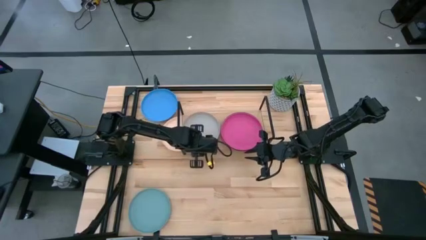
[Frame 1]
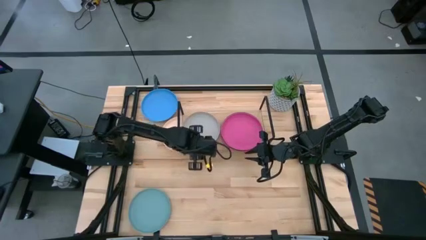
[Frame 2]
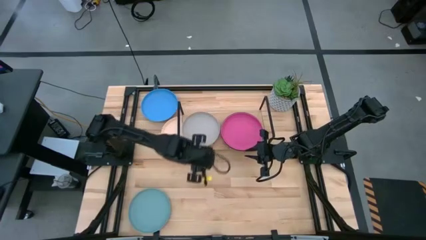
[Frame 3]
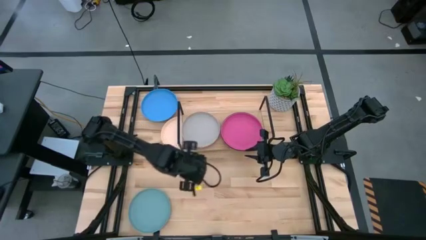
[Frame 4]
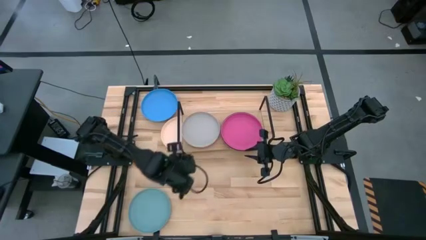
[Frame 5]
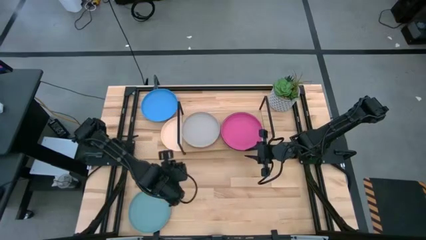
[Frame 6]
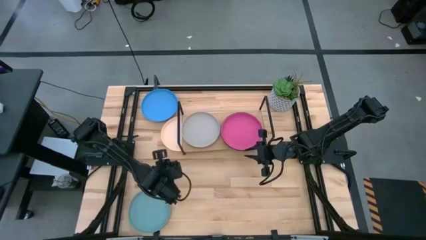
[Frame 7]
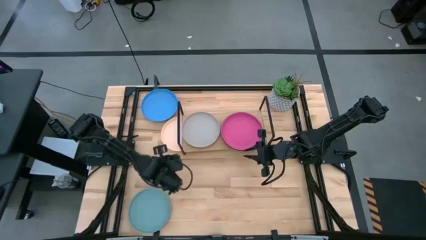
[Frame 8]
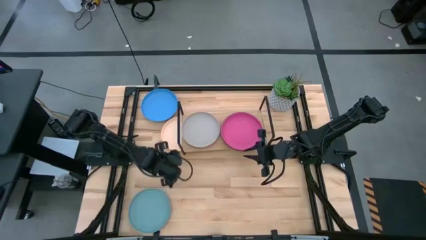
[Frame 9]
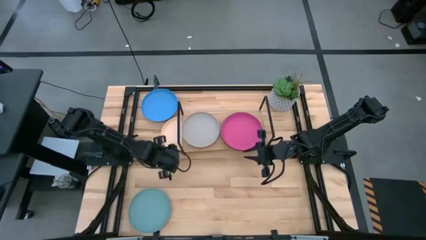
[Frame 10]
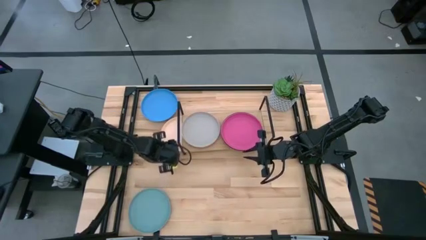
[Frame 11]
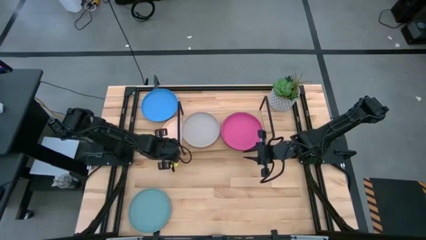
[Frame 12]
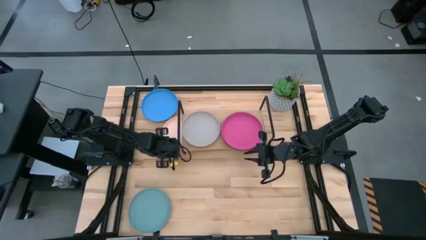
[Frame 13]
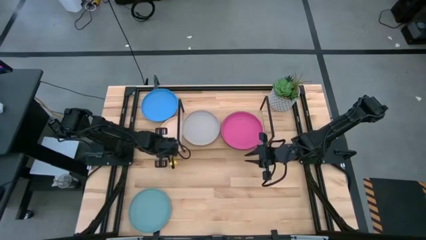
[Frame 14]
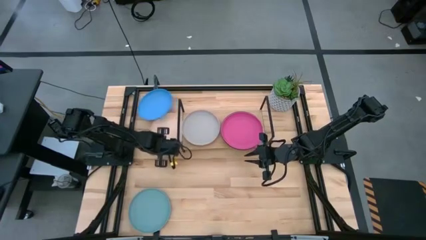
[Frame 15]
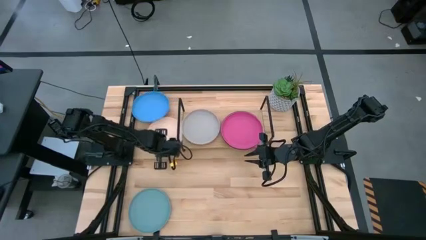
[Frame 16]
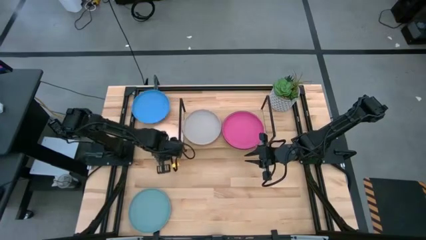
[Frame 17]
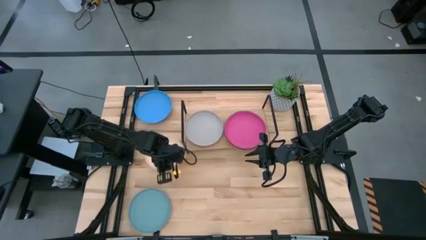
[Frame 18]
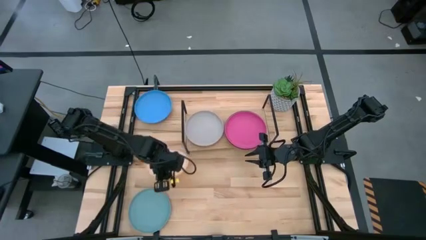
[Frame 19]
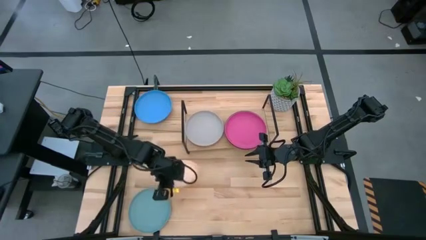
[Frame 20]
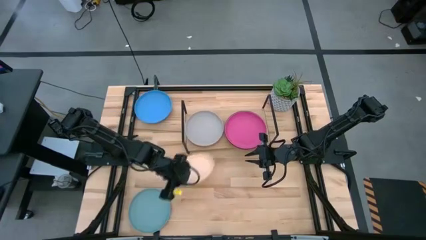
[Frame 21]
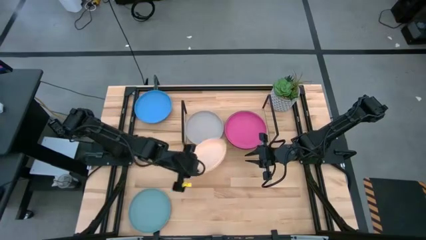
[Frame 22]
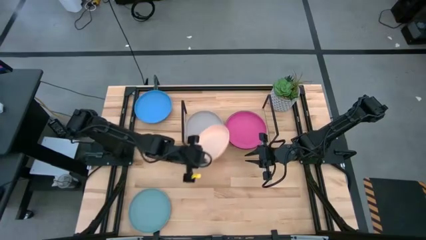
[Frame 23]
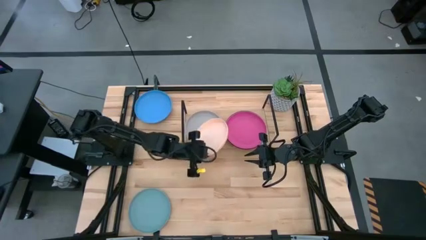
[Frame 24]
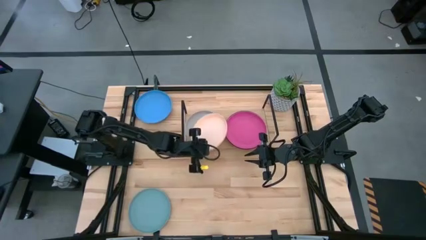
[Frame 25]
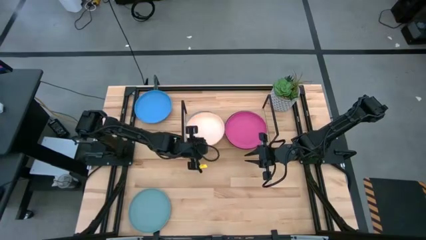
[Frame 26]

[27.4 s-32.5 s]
Task: Place and stack plates onto a shelf
Stack the white plate on top of the gray plate on the shelf

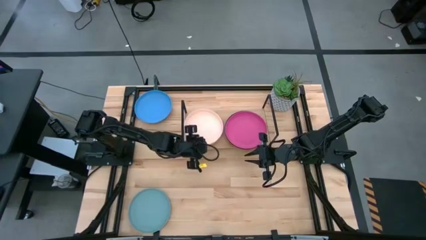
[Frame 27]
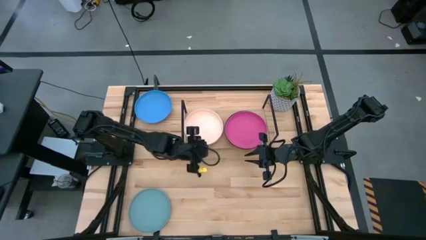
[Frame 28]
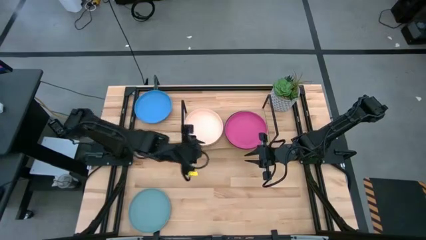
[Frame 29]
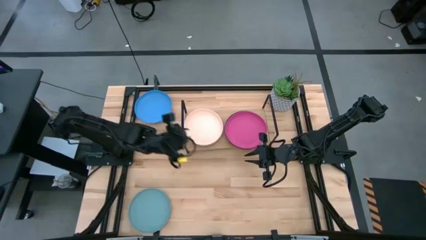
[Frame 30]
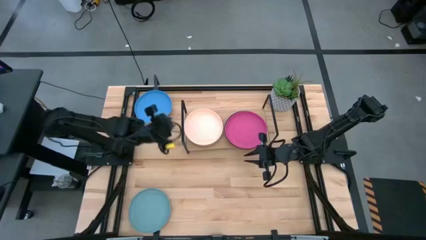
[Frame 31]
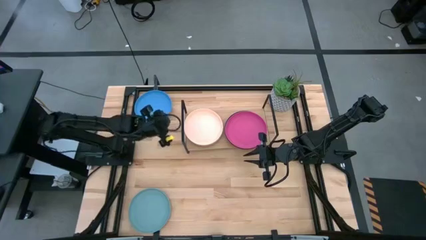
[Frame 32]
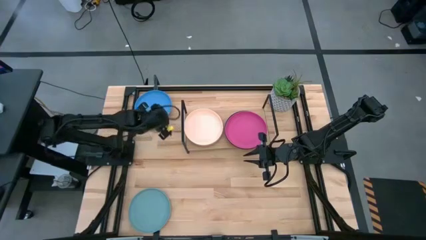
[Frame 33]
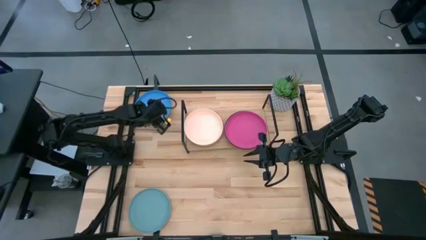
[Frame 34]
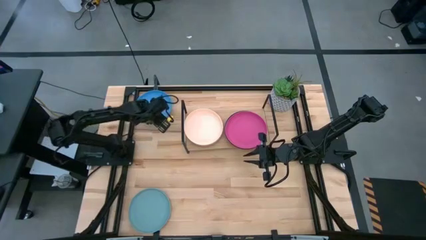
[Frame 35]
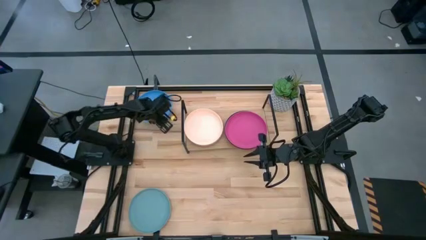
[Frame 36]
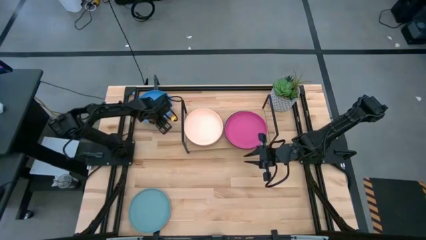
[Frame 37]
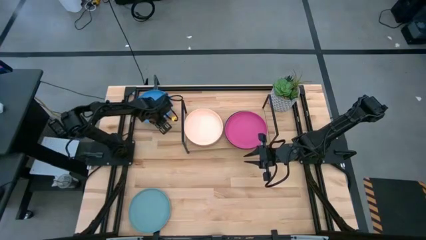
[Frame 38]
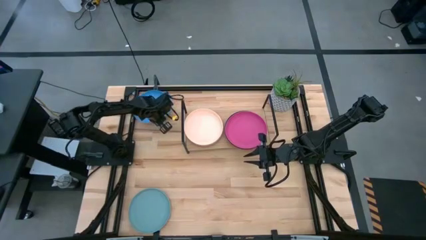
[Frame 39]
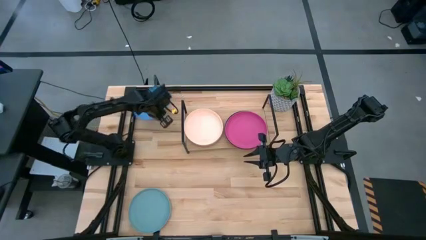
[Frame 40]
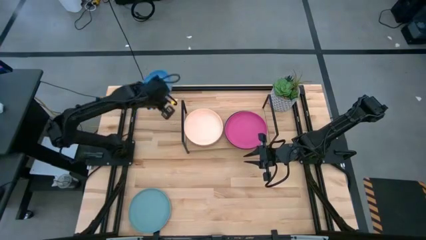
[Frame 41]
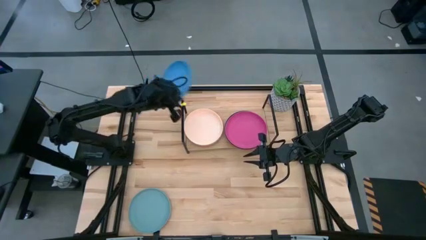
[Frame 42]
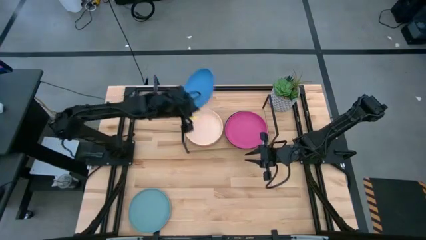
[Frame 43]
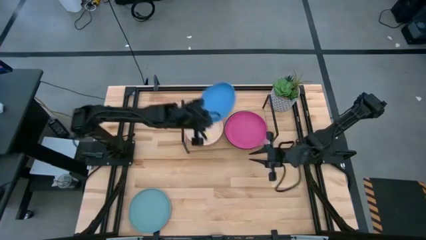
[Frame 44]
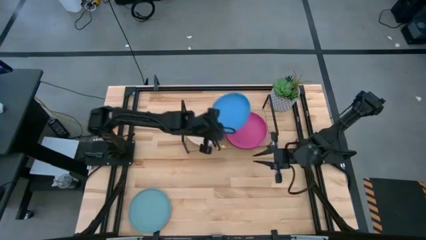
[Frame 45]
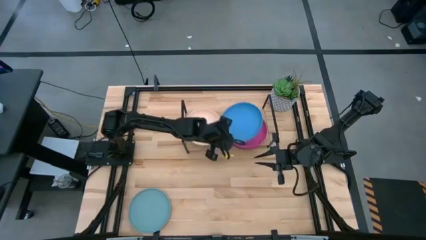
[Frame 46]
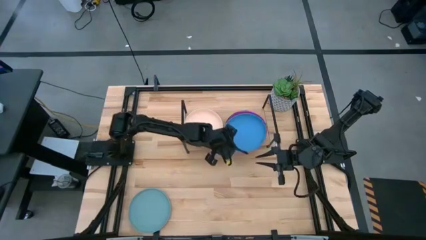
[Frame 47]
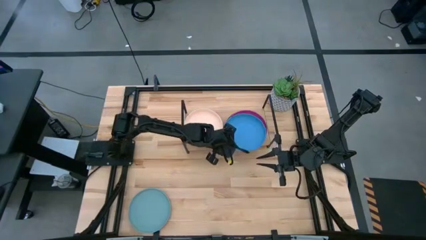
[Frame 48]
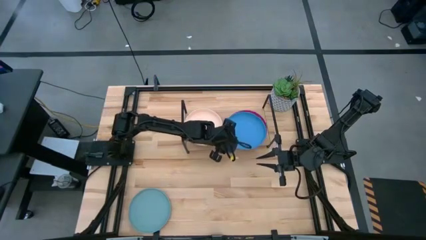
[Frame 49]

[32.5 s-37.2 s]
Stack the blue plate on top of the pink plate on the shelf

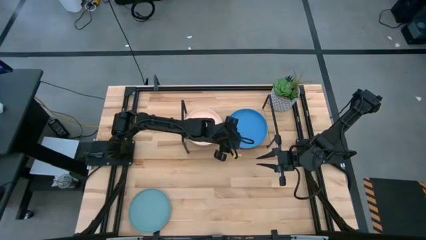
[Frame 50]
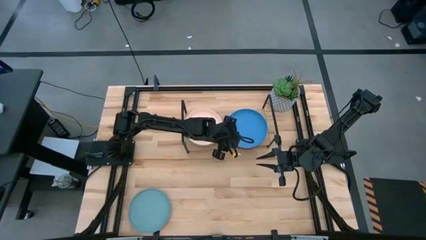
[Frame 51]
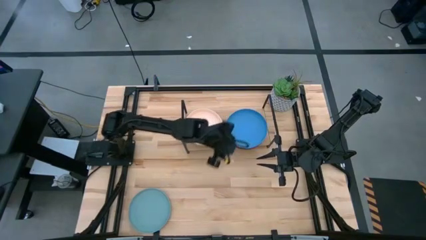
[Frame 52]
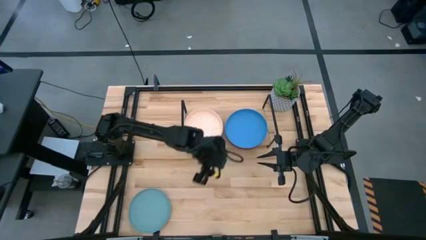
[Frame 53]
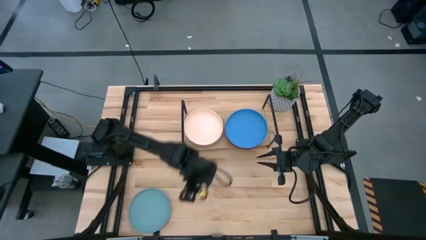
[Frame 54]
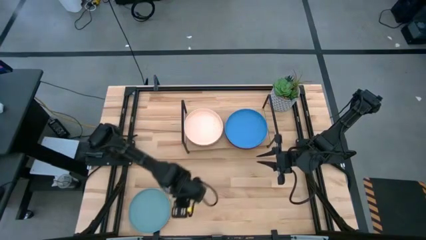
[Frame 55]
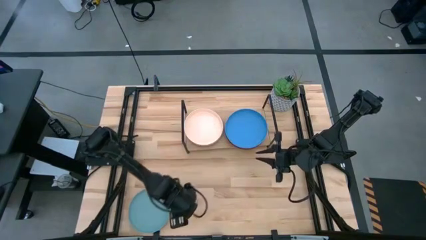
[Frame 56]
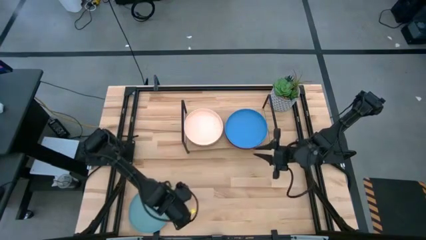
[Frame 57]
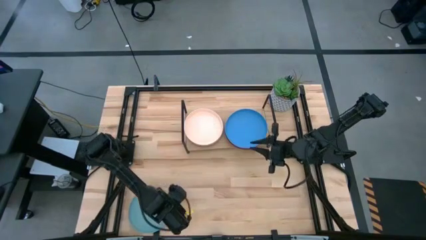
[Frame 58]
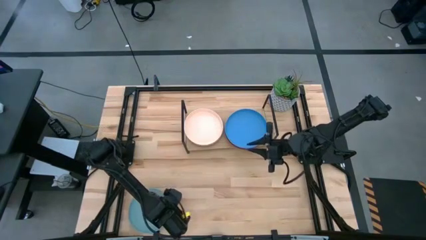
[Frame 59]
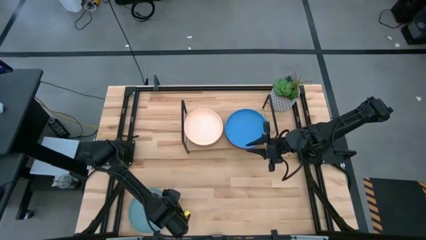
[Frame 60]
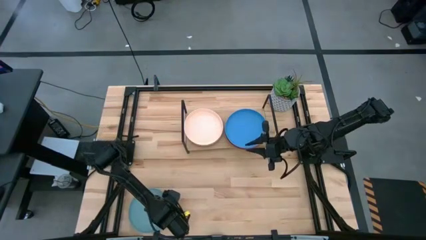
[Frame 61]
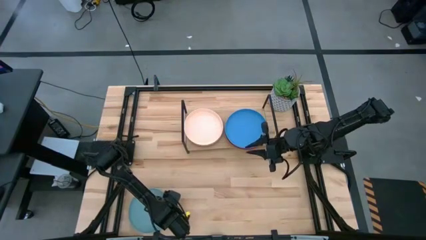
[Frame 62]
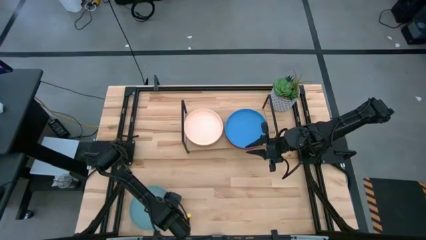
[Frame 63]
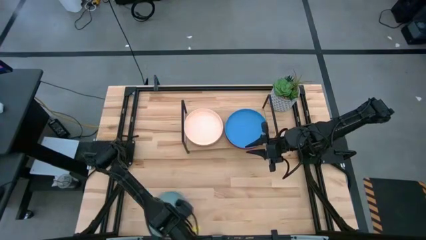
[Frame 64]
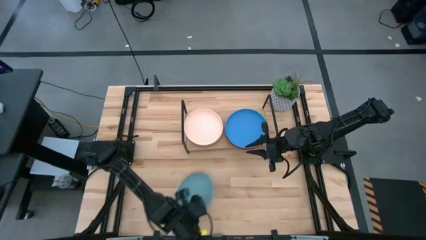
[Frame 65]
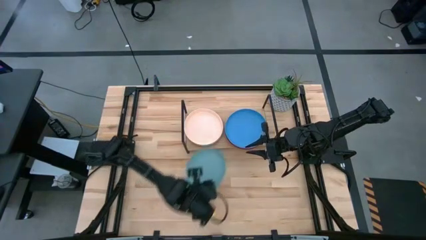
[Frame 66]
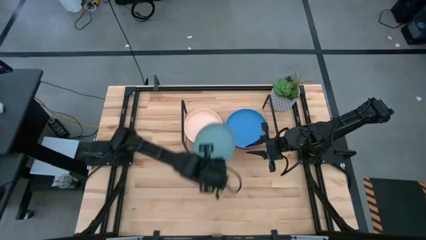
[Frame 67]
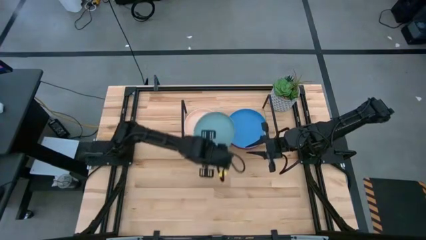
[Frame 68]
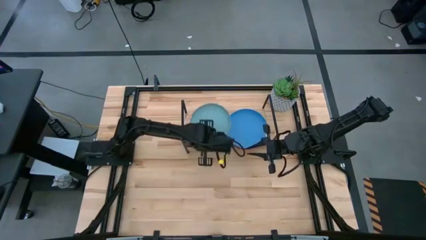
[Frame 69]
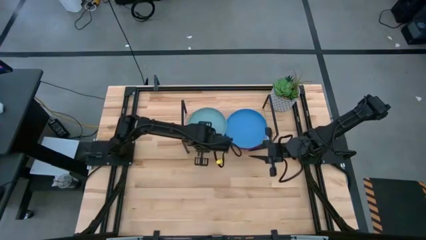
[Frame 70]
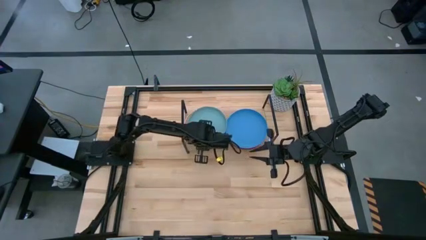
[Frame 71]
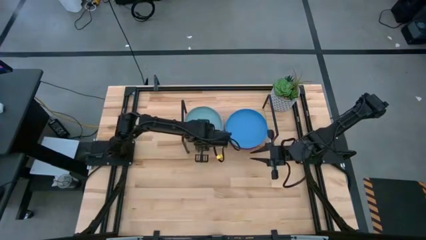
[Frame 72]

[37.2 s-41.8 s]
Stack the light blue plate on top of the white plate on the shelf

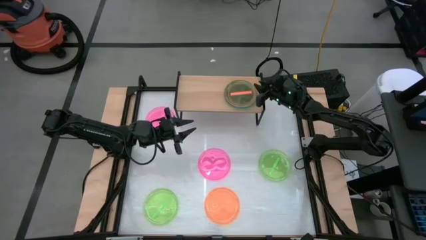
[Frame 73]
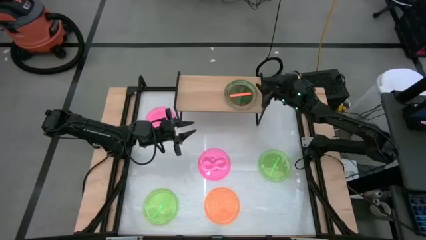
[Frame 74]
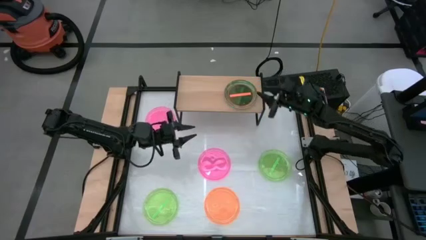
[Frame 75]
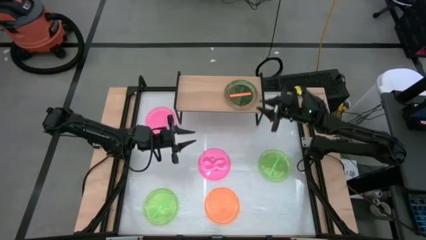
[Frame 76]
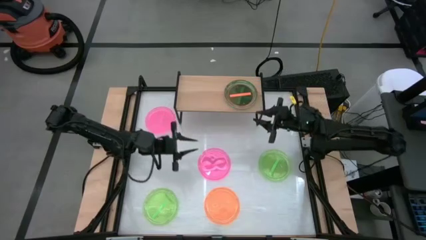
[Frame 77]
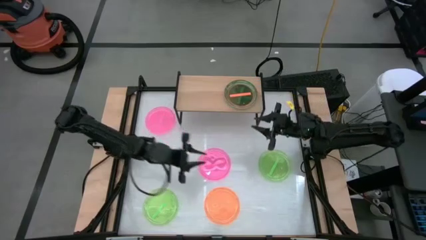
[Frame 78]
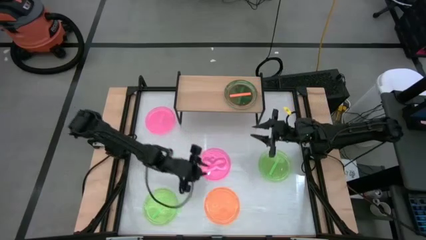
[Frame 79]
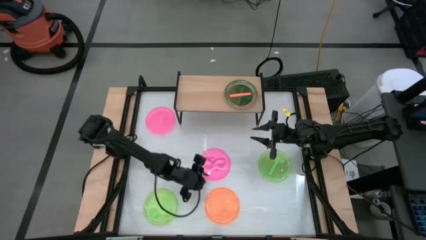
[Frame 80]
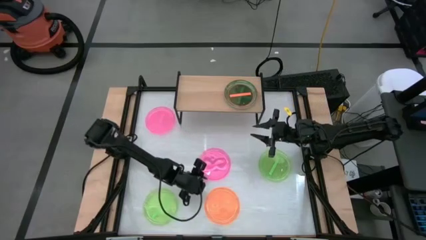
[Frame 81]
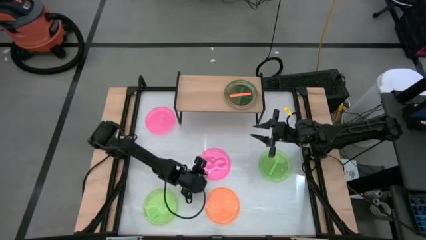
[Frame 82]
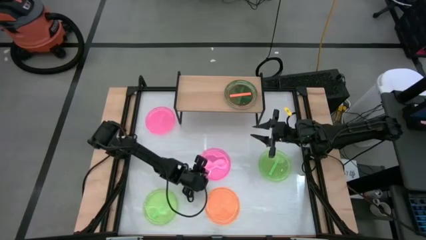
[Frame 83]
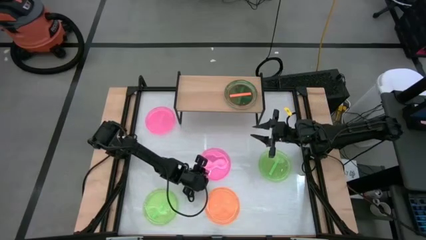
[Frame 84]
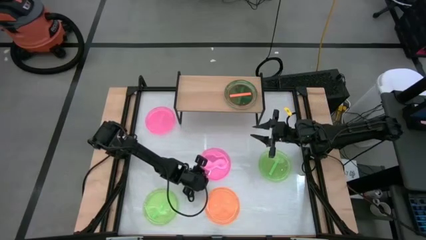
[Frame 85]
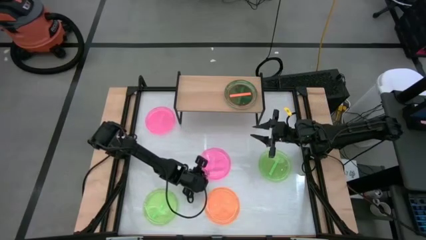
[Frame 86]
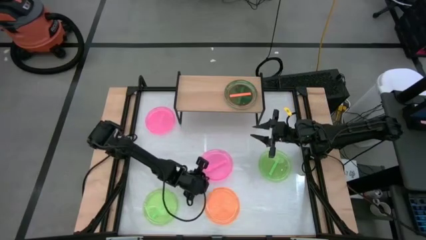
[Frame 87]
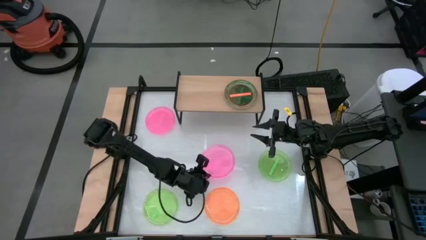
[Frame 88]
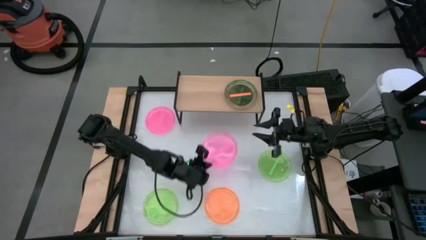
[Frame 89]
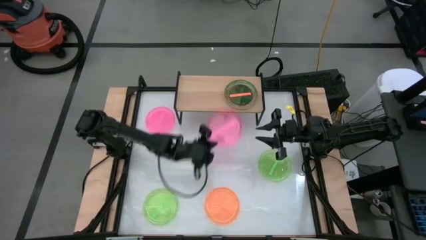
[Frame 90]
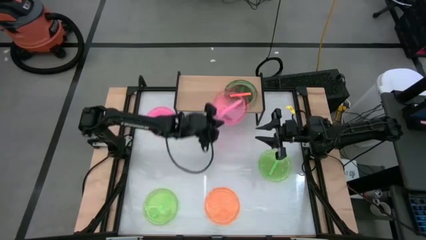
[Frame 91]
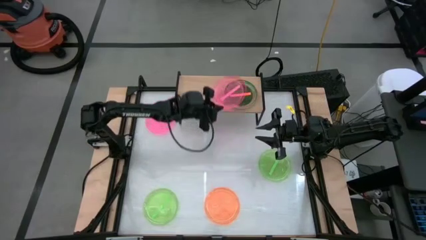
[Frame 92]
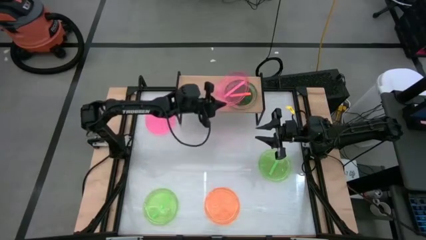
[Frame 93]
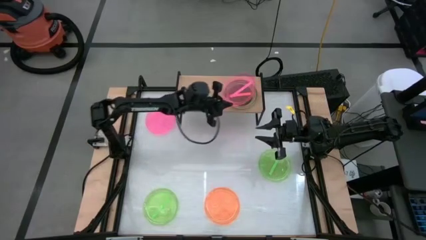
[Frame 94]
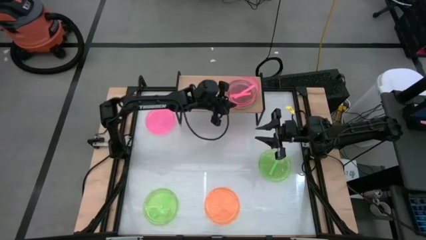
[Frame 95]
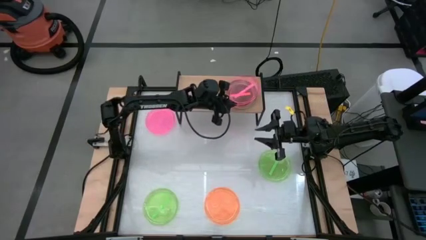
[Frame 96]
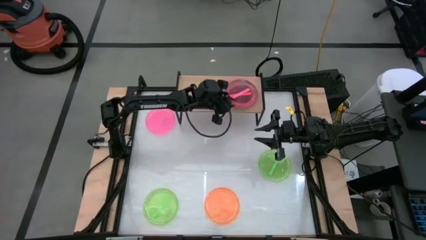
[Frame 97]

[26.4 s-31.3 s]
Task: Place and stack plates onto a shelf
Stack the right pink plate on the orange plate on the shelf
